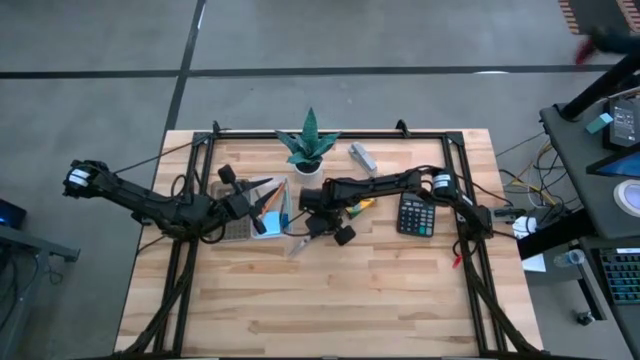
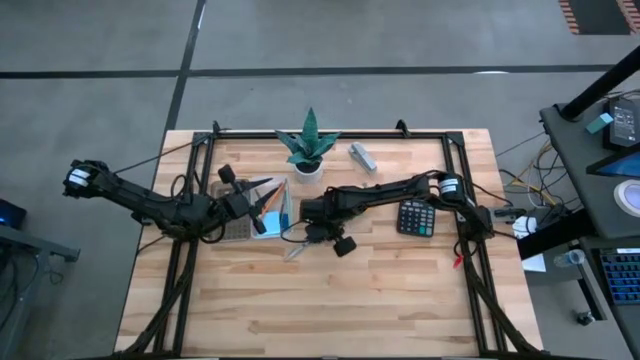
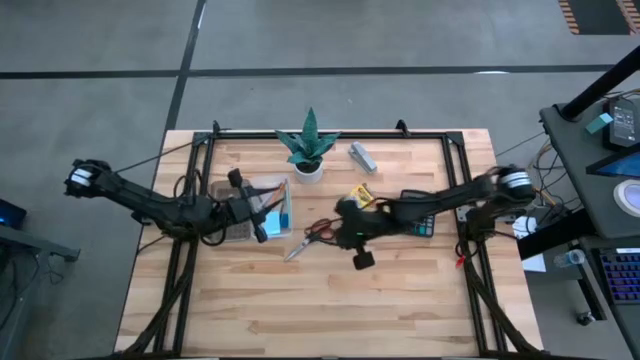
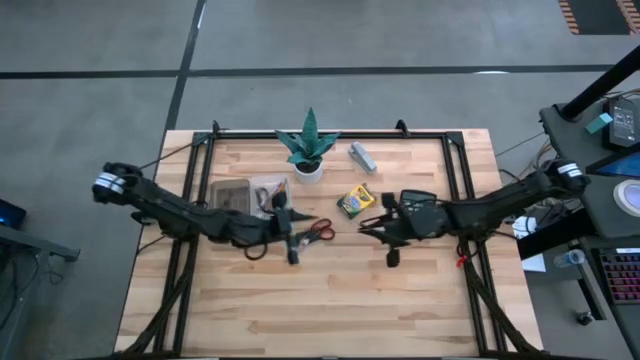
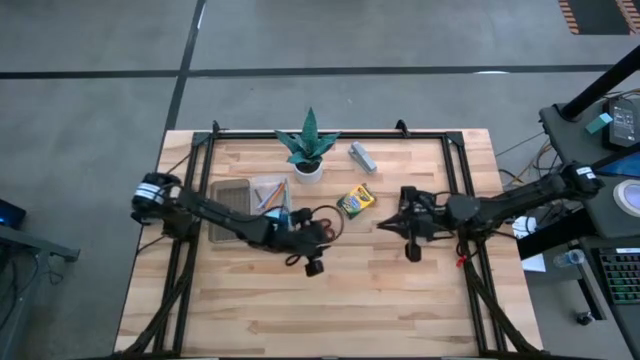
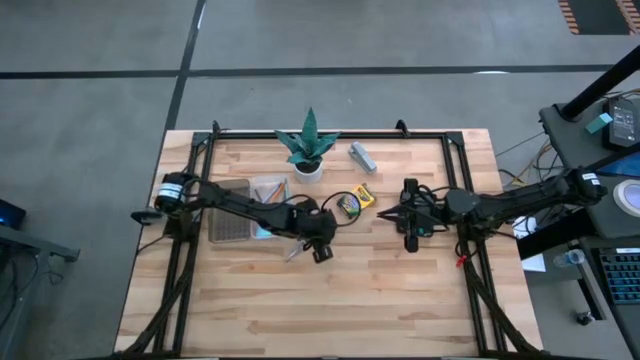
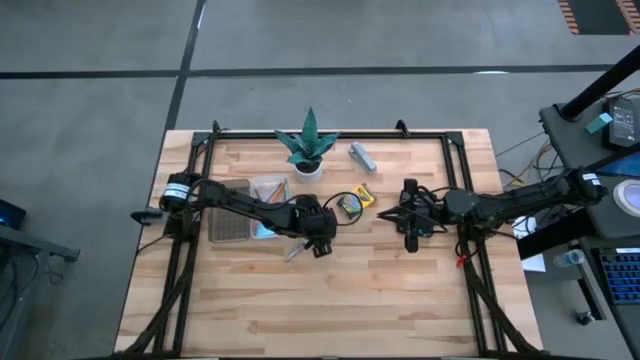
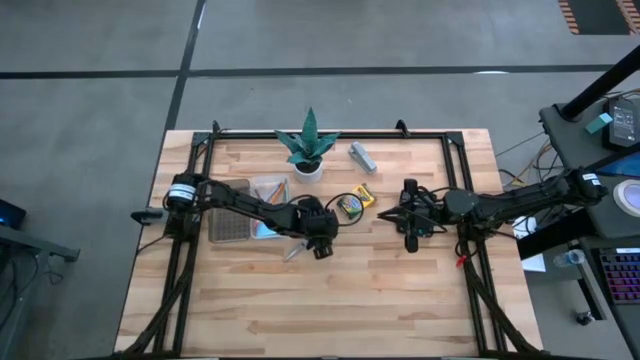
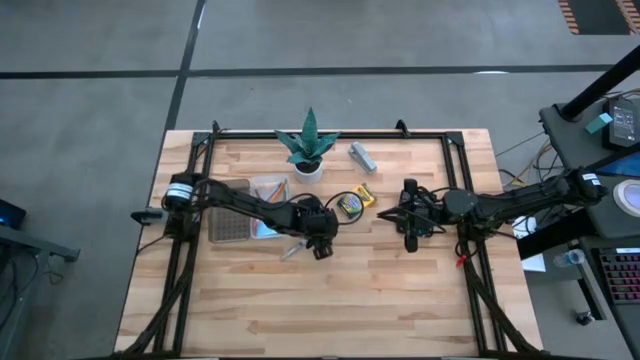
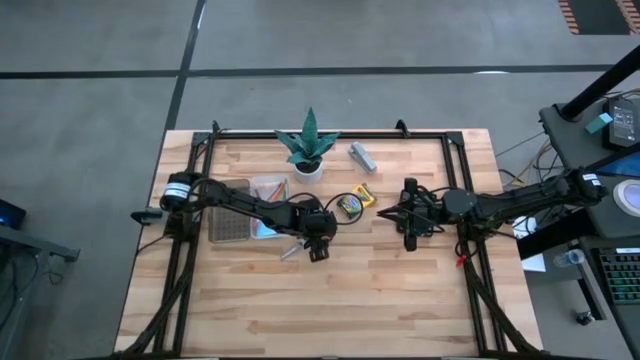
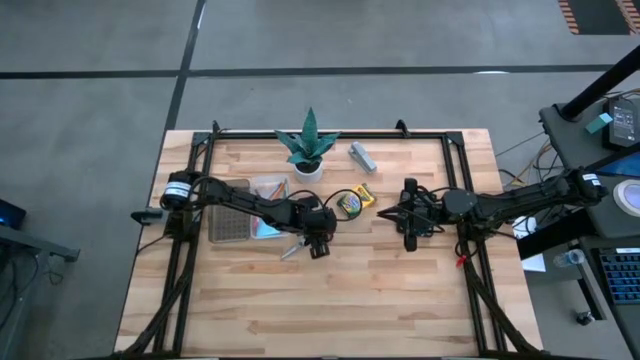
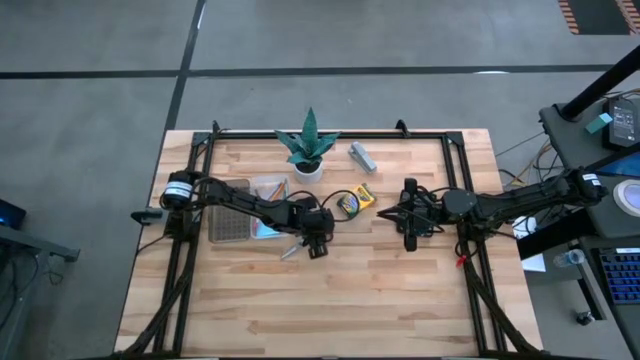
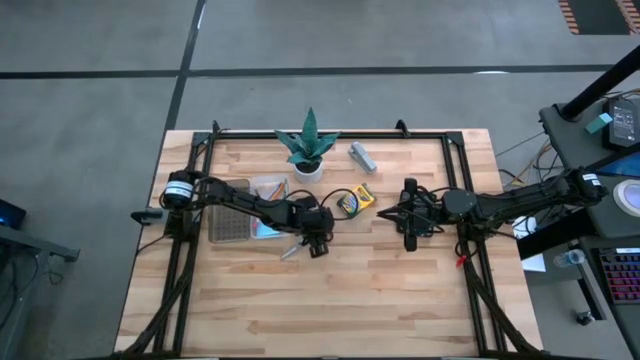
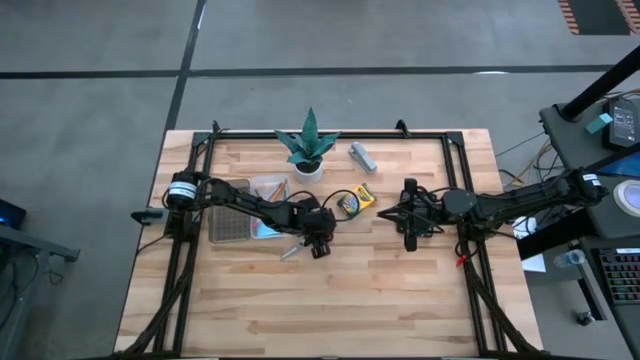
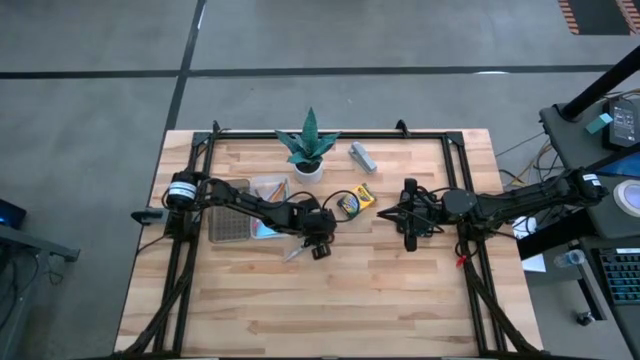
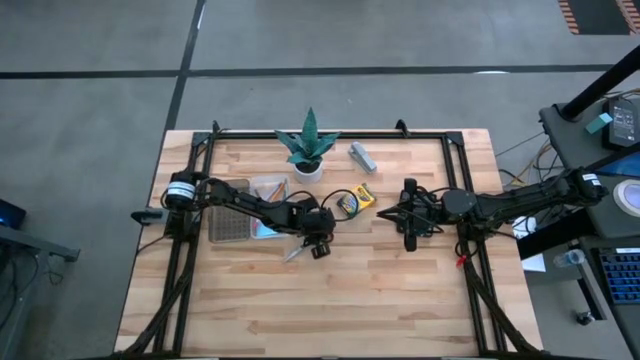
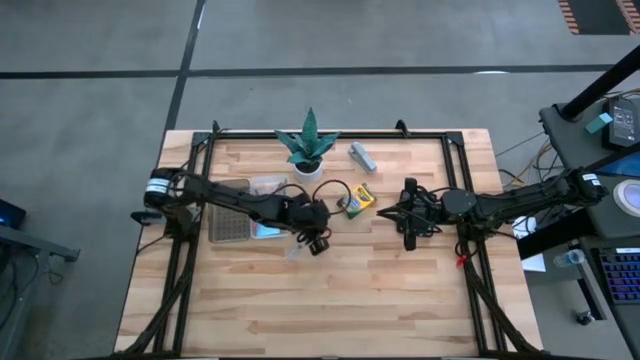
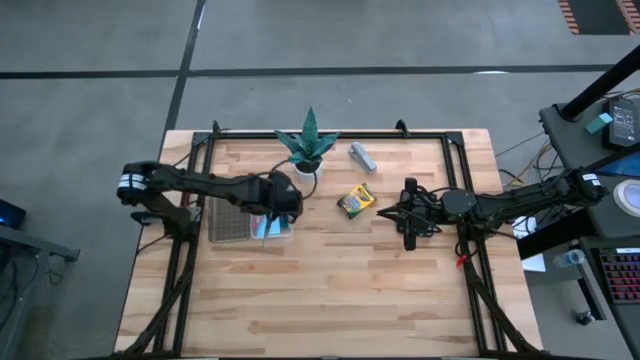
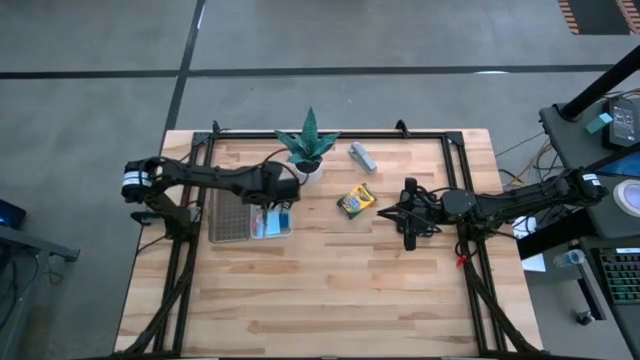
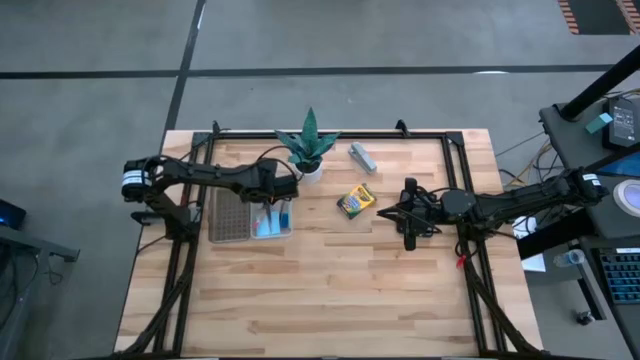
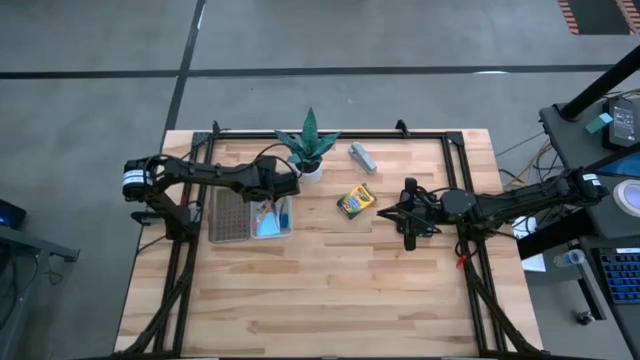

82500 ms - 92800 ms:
Task: Pack school essentials
Put the black scissors into the white and black box

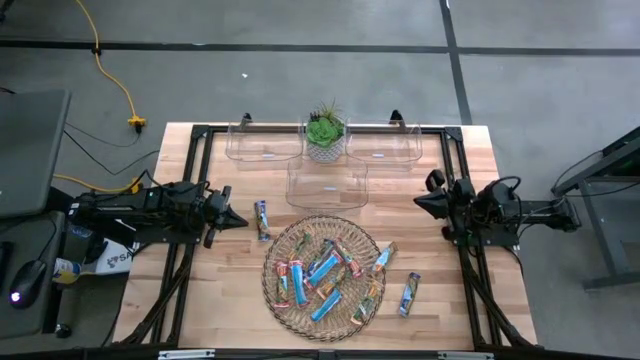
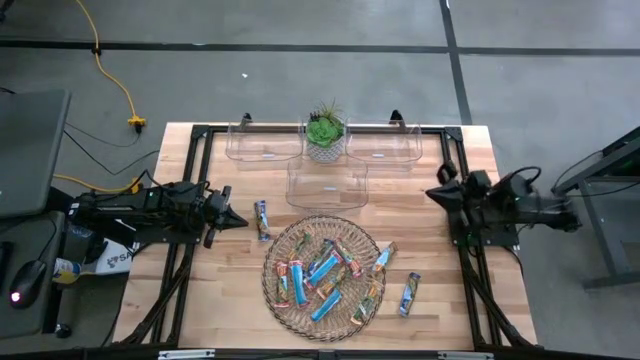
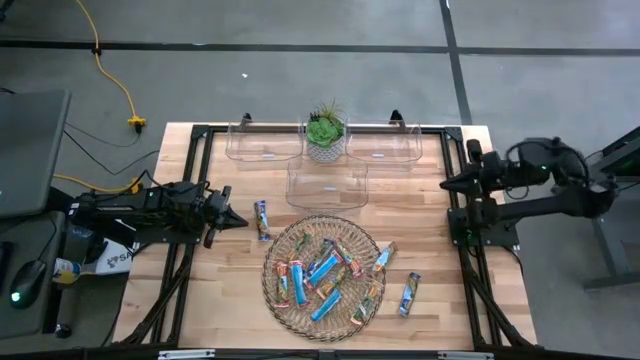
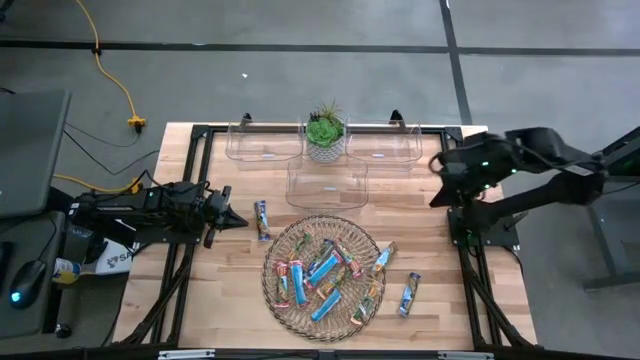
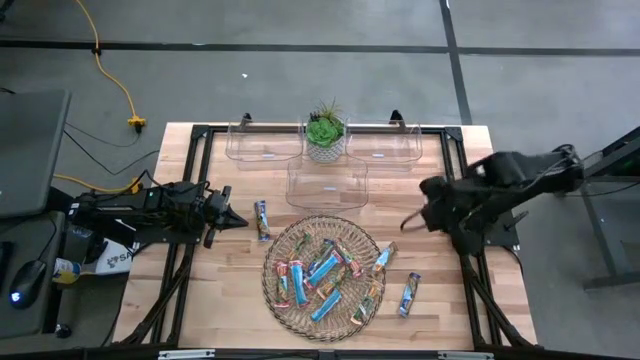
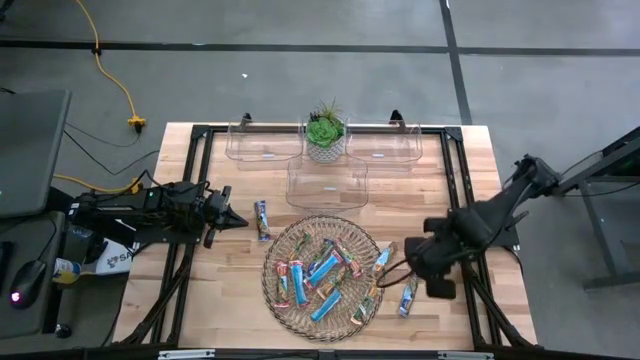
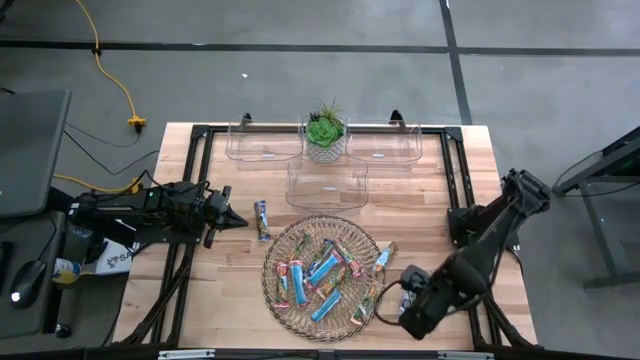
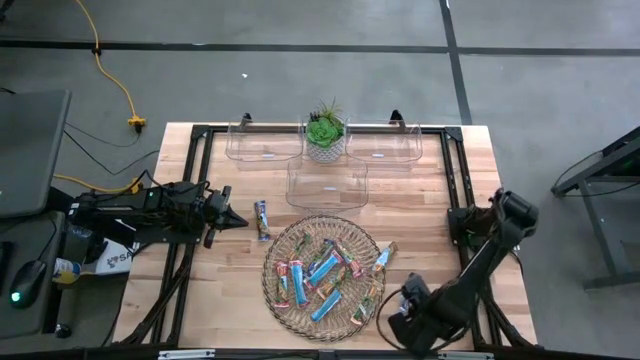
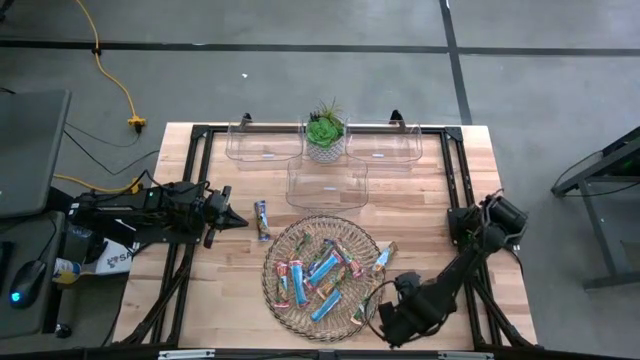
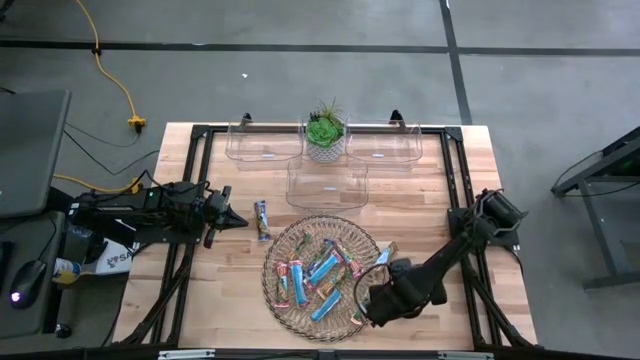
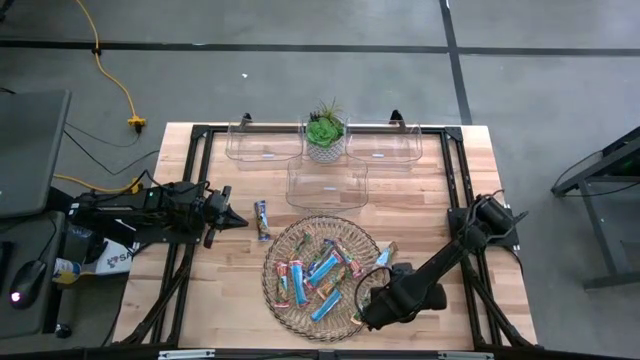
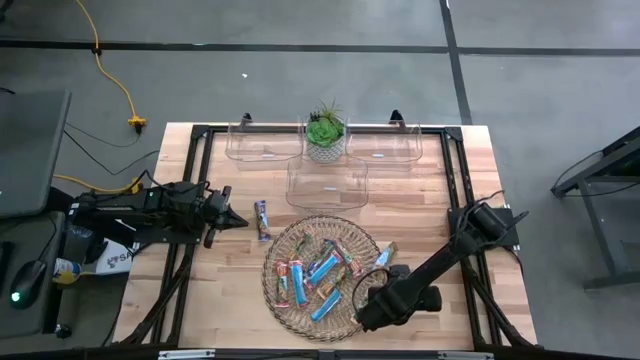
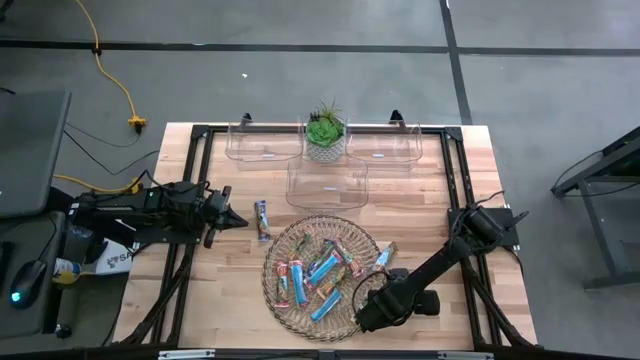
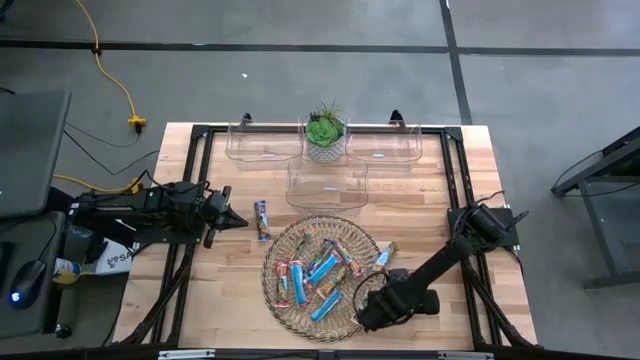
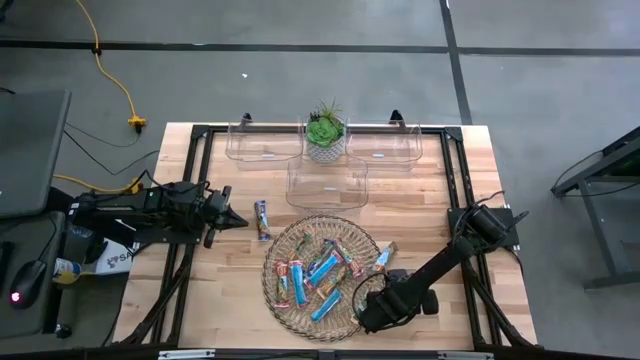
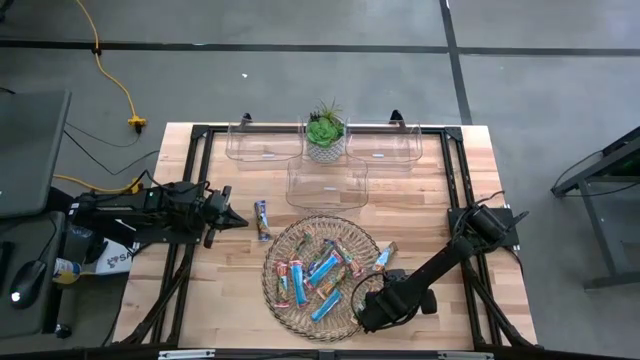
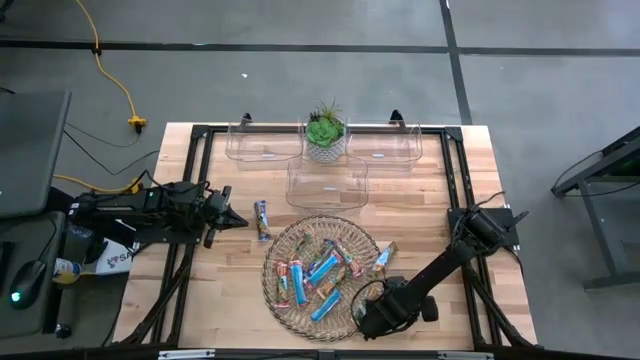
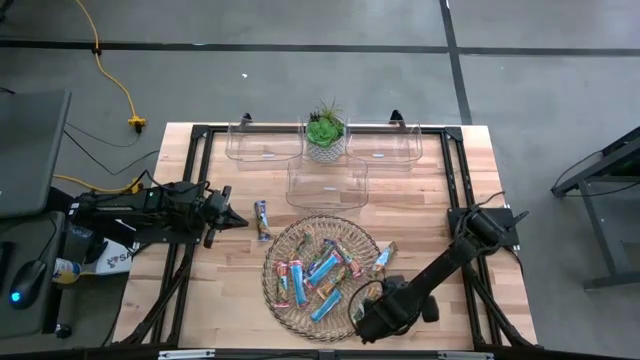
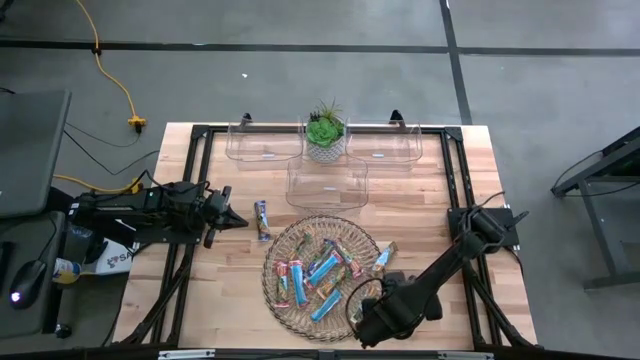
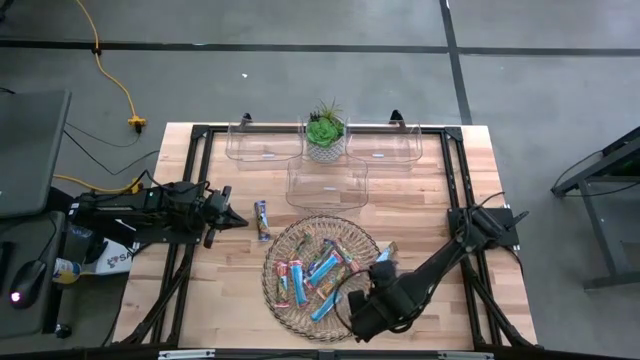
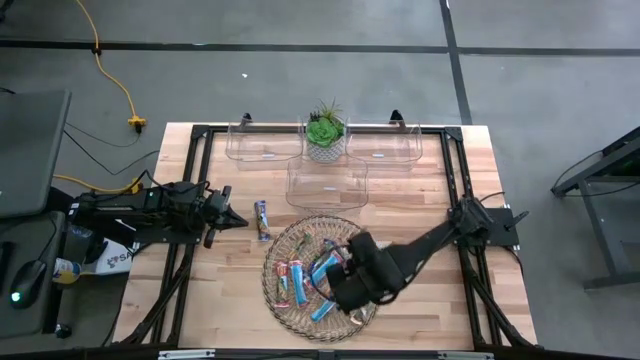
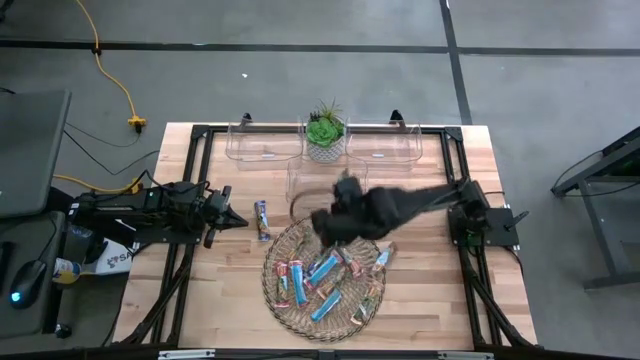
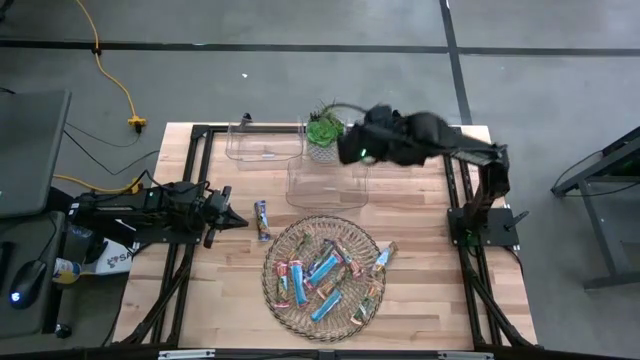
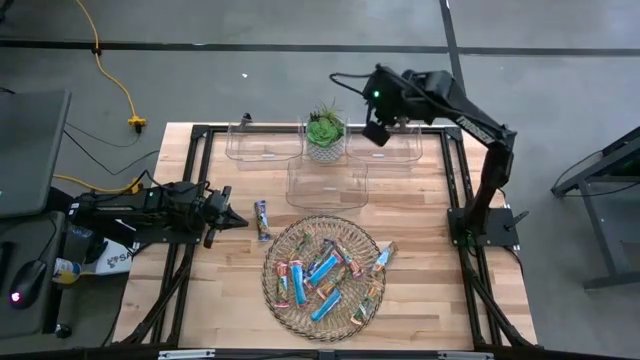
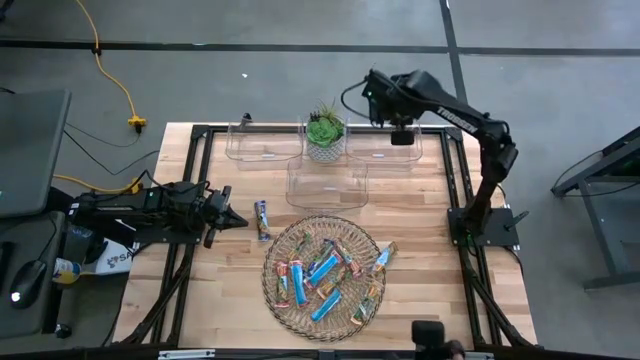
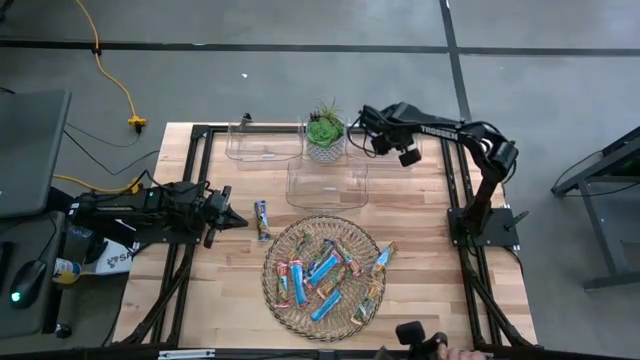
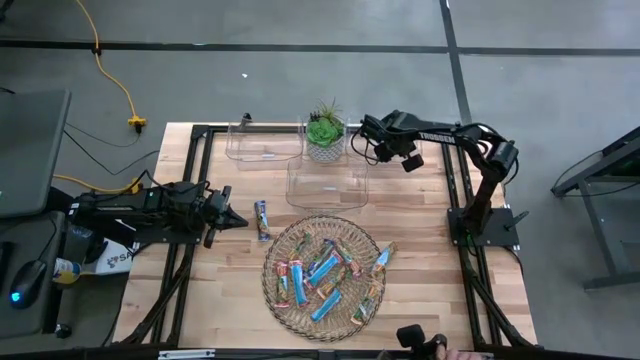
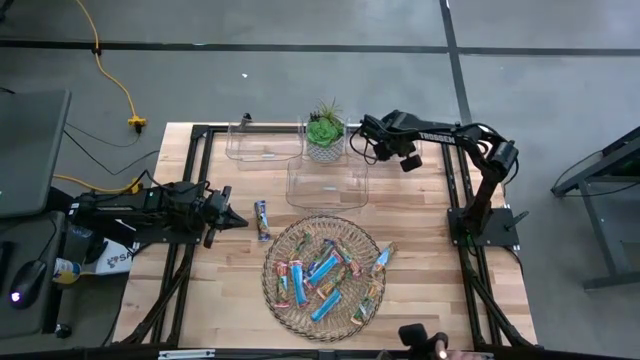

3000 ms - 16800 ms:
Task: Pick and place Granola Bars by type
Put the blue granola bar into the top right transparent bin
